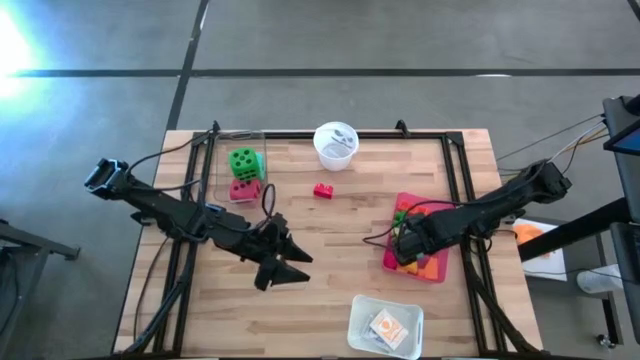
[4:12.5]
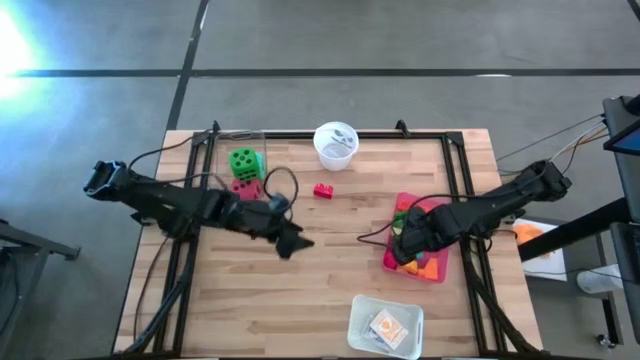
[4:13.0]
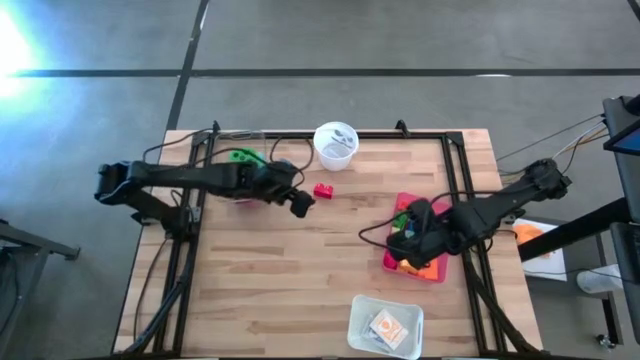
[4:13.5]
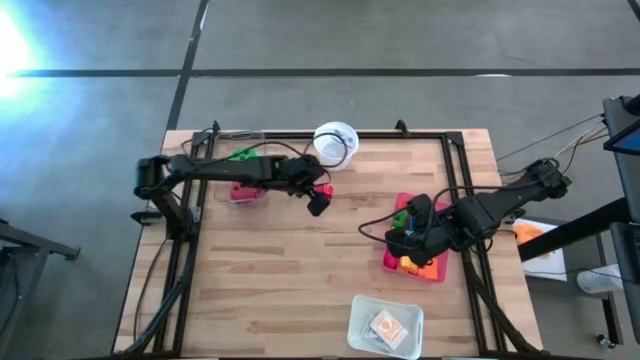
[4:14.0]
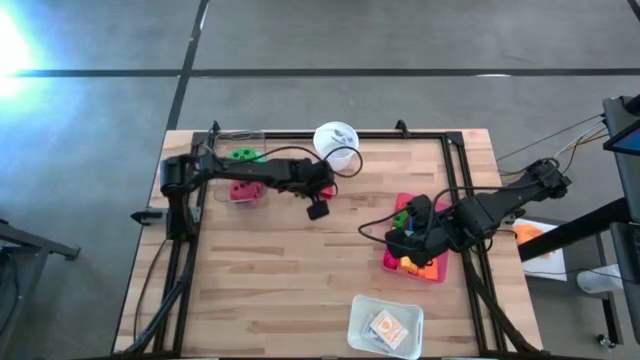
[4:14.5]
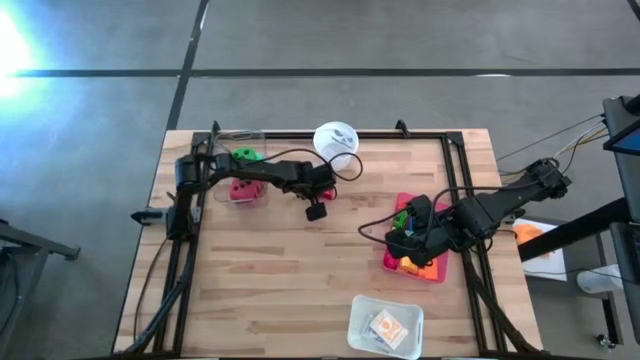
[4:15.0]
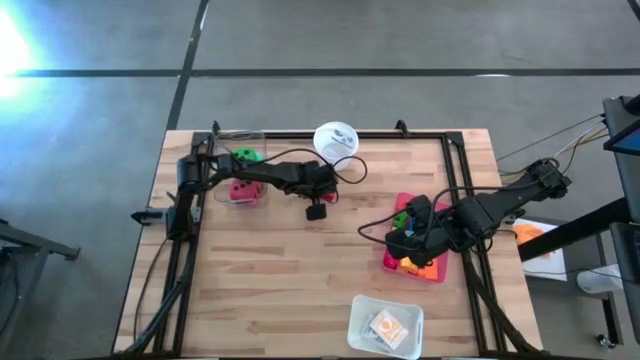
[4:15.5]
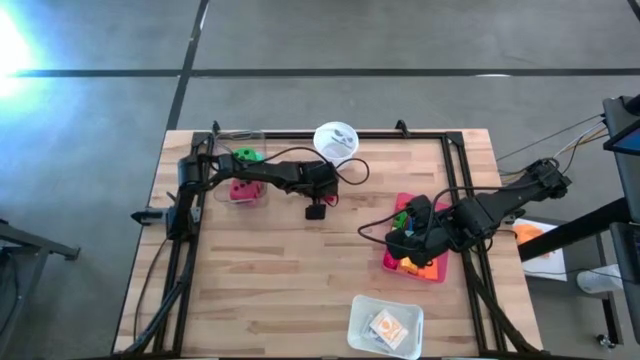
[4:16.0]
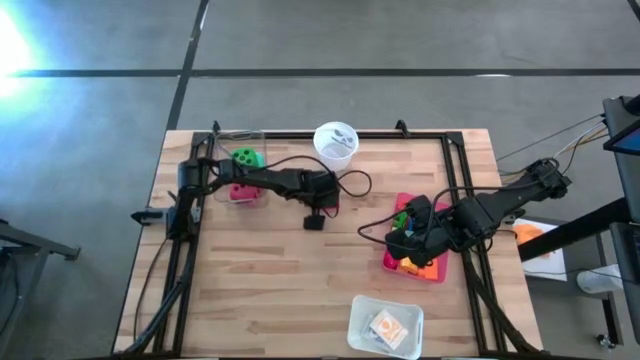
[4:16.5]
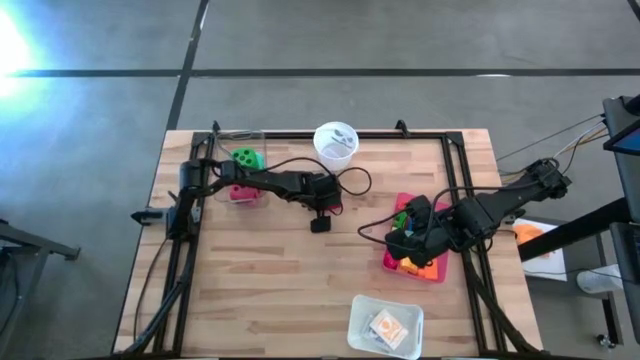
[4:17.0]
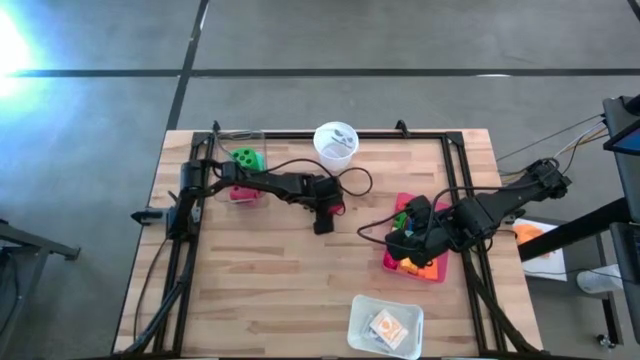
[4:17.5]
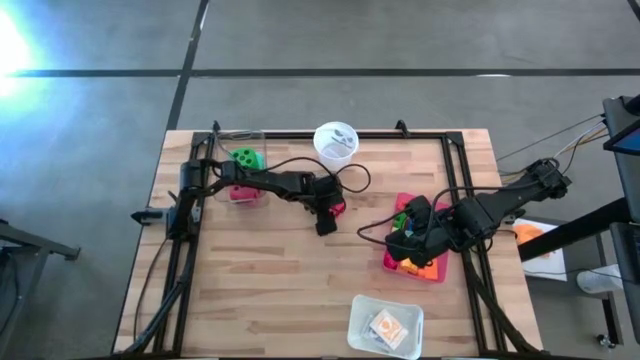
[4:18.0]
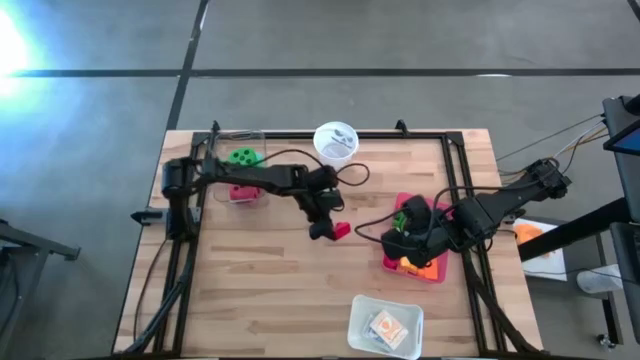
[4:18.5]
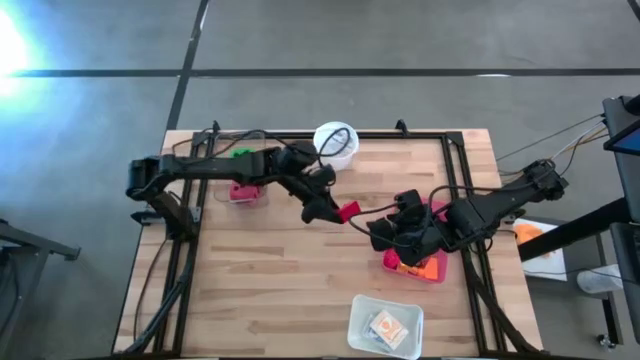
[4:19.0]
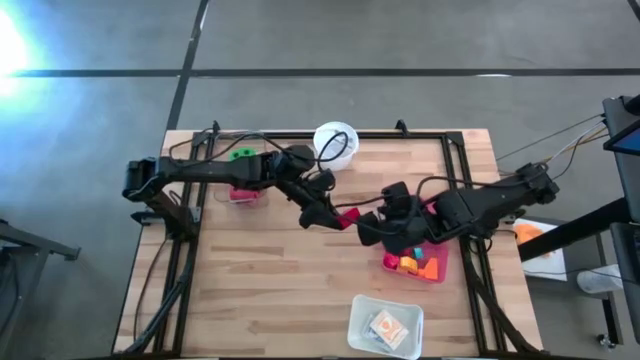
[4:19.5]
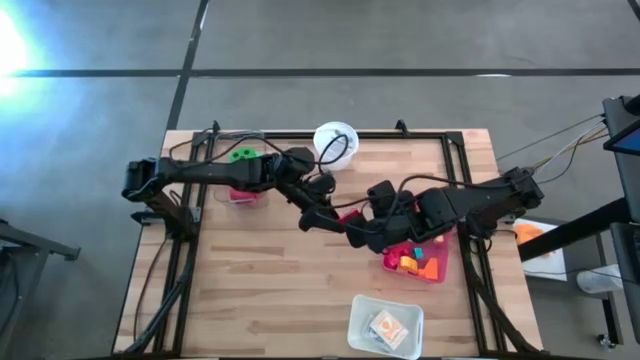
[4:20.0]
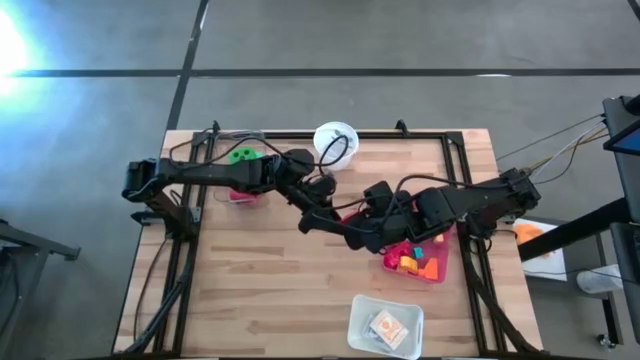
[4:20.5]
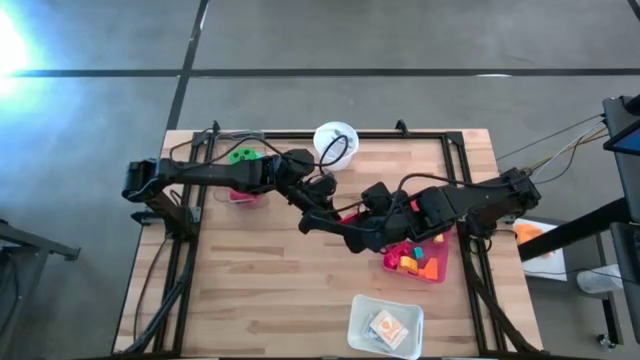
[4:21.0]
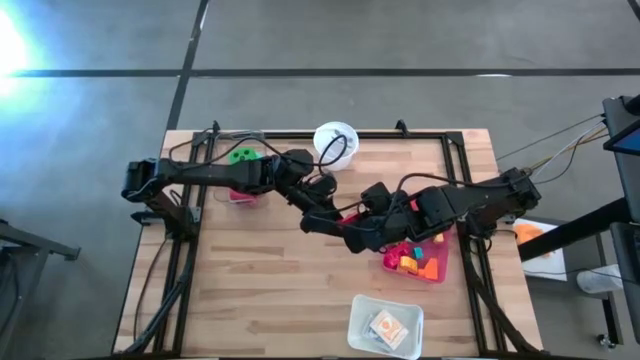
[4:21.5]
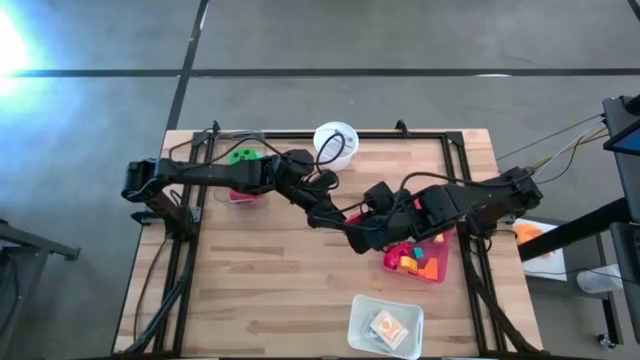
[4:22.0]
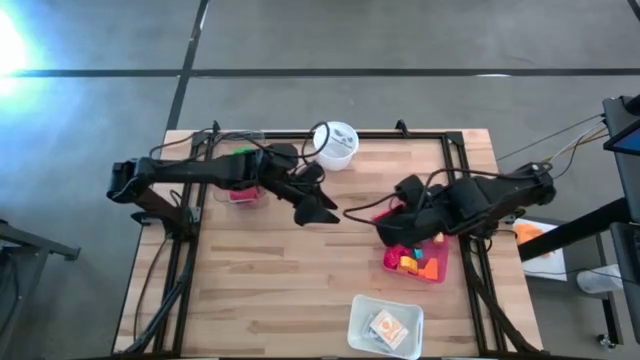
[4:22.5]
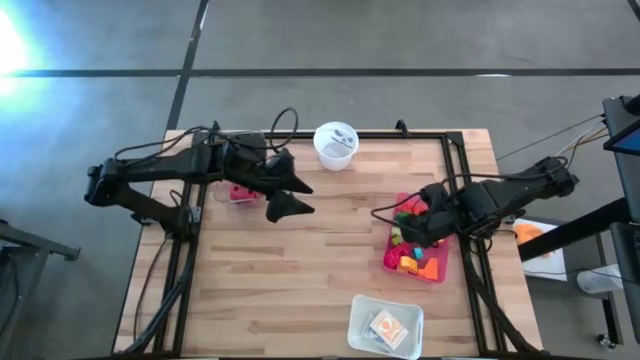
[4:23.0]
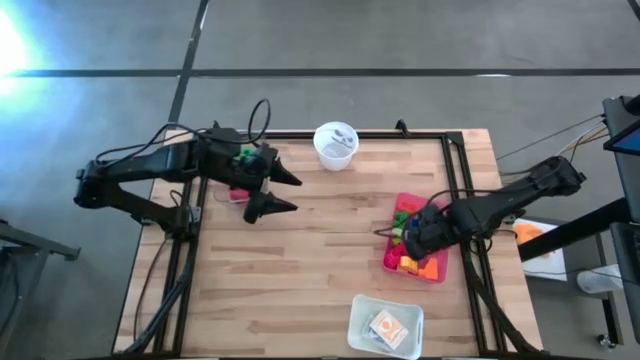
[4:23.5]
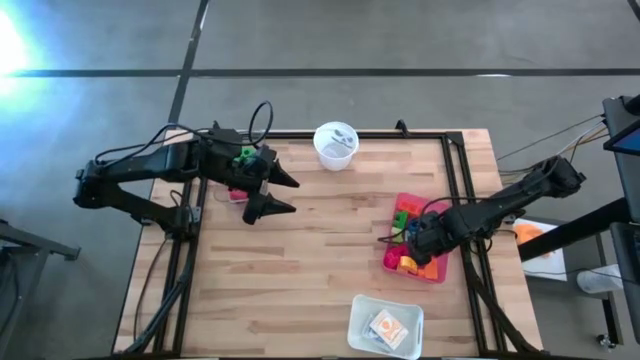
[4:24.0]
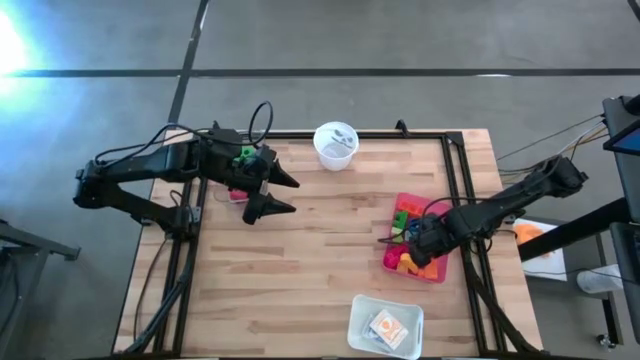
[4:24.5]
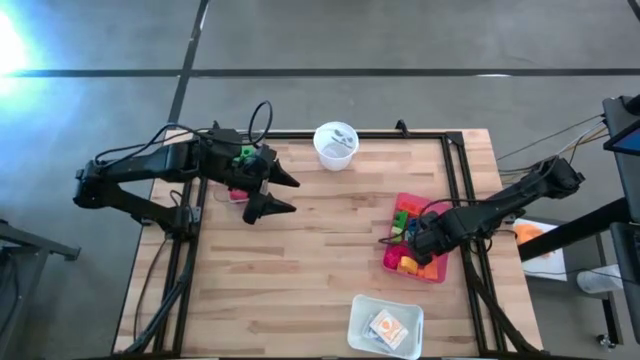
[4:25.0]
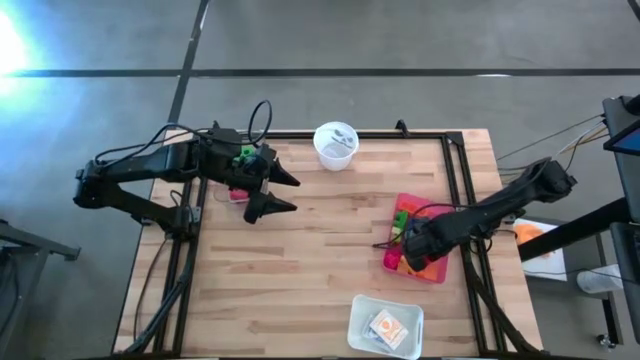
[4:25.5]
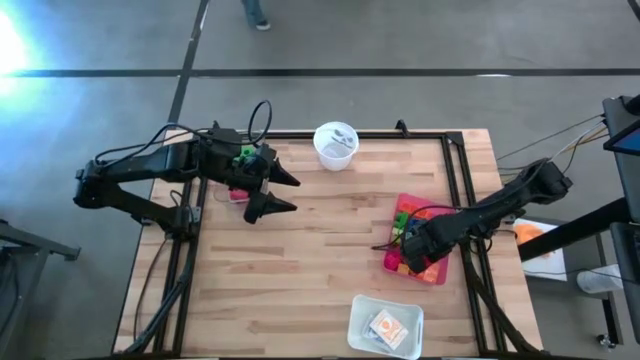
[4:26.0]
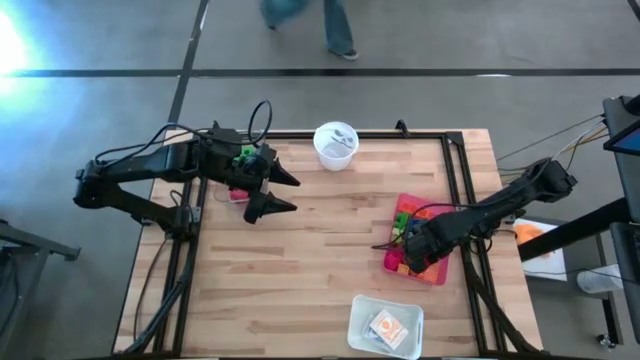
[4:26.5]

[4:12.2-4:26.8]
Task: Pick & Place Toys
Put the red game piece into the pink bin

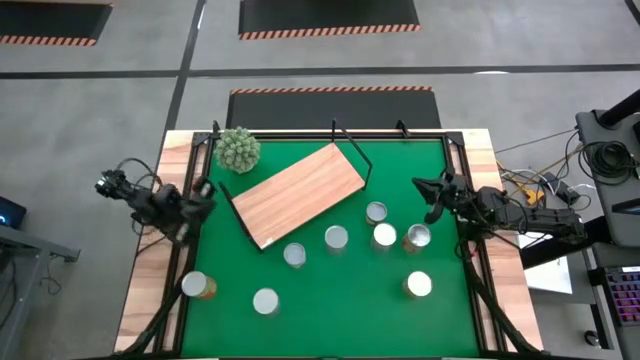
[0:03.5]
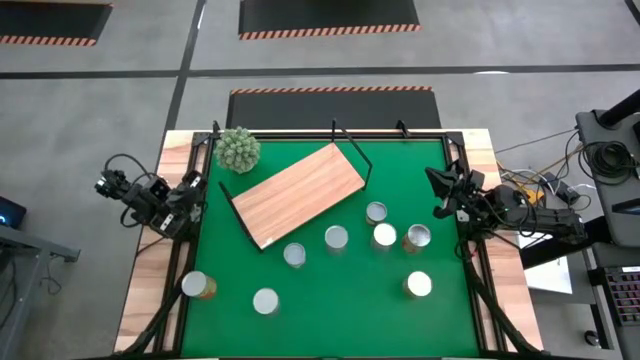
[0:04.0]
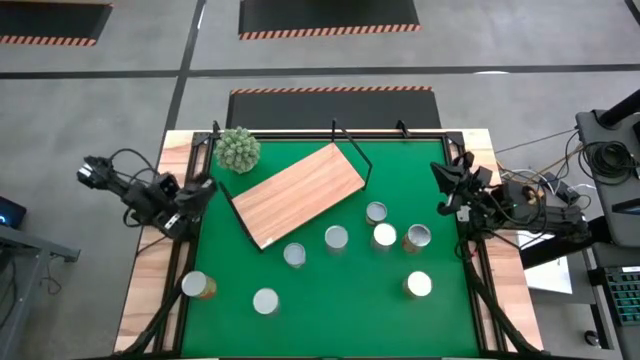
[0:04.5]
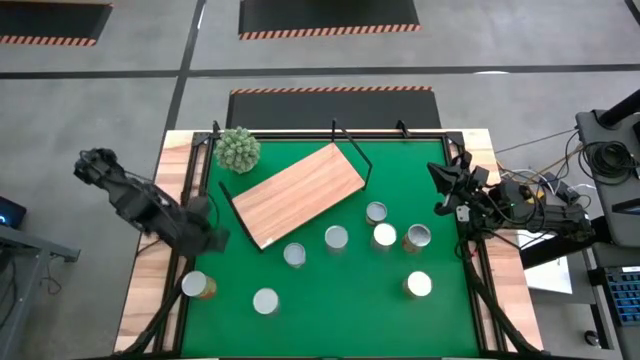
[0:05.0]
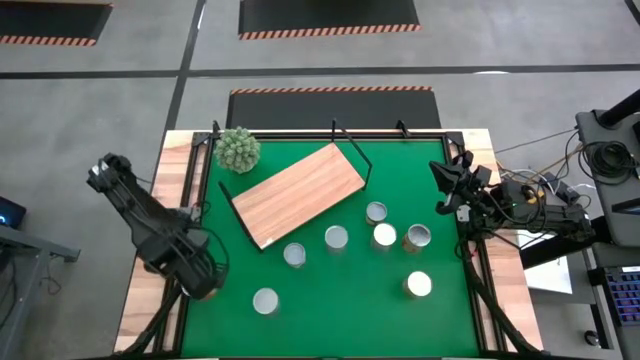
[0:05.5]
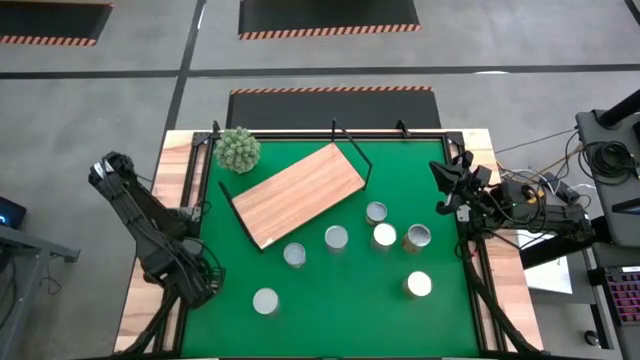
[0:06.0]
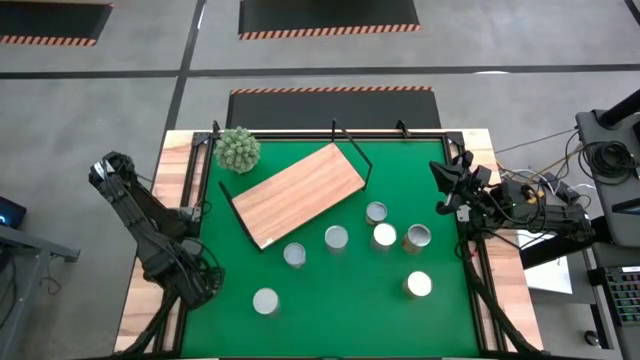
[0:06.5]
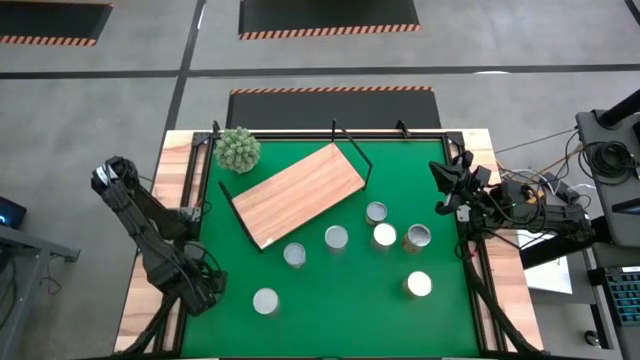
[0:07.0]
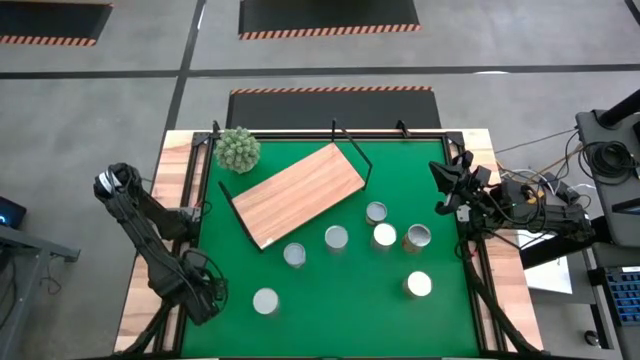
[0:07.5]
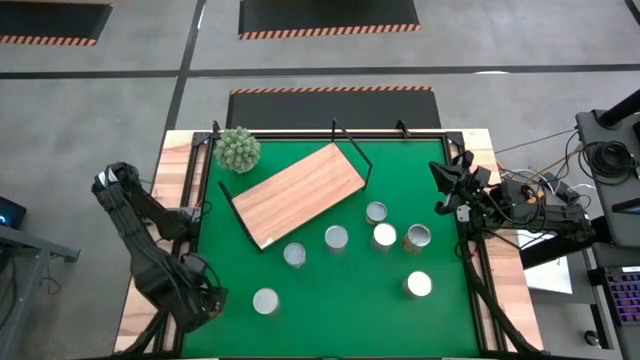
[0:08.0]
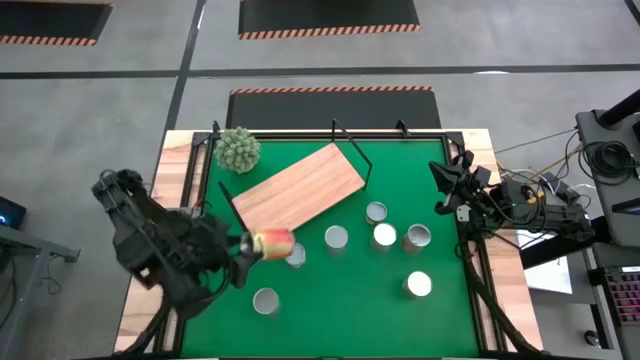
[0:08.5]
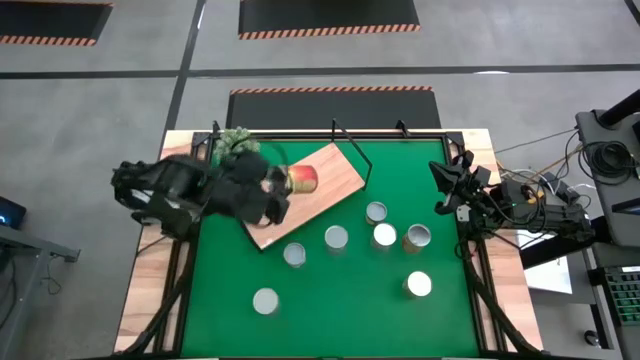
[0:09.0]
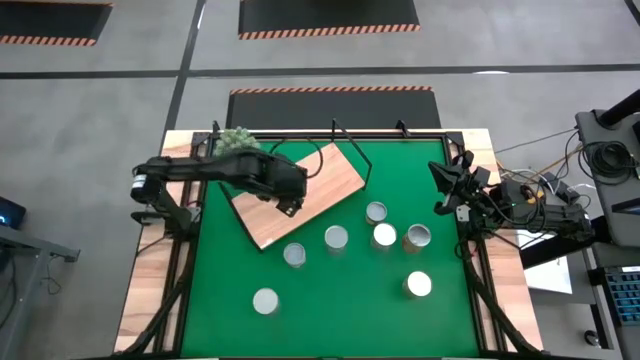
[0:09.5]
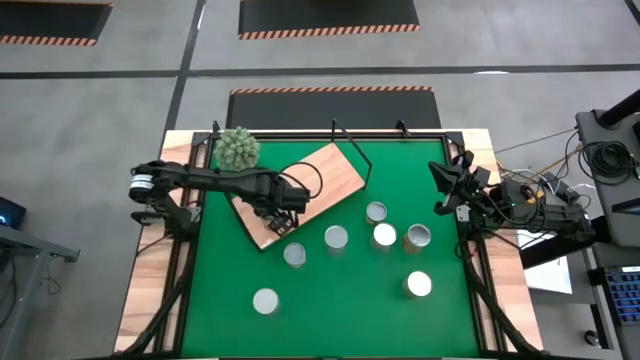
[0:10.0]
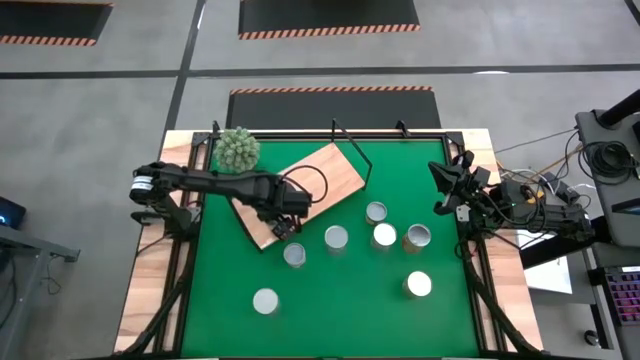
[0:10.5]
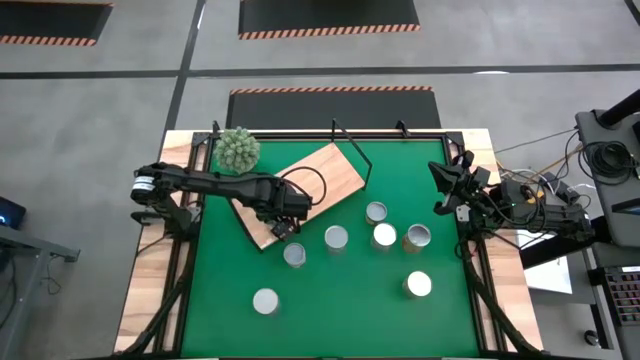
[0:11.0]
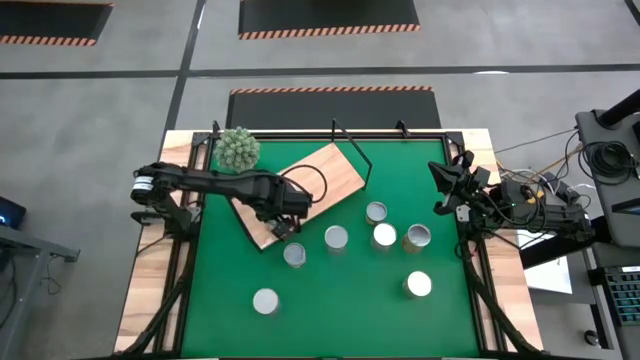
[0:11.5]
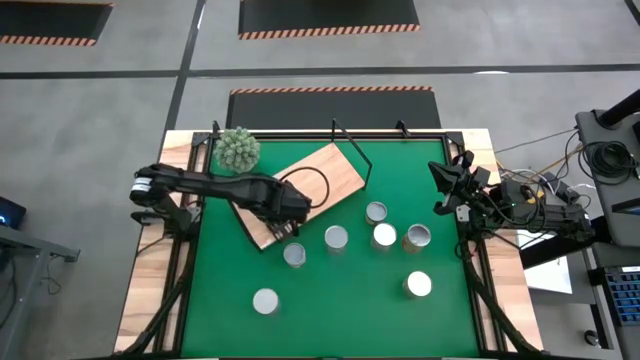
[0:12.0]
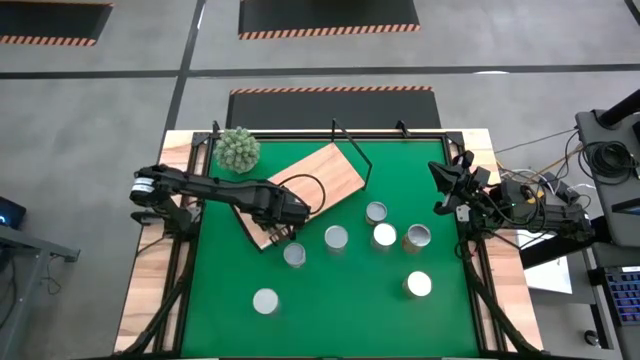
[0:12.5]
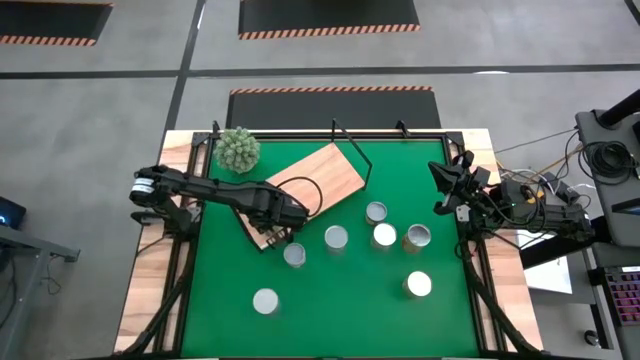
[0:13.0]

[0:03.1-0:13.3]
Task: Pick and place cans onto a shelf
Put the left canned pineapple on the shelf
